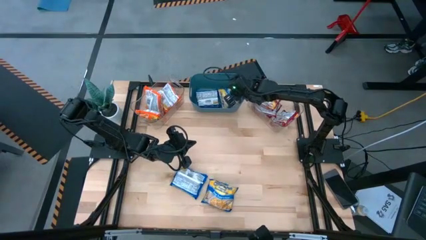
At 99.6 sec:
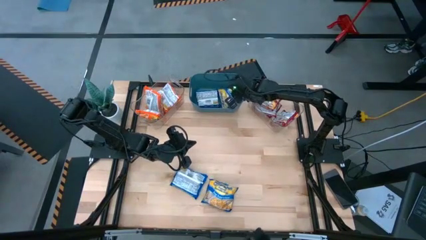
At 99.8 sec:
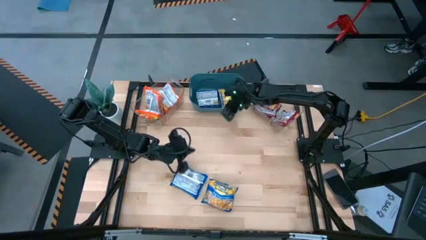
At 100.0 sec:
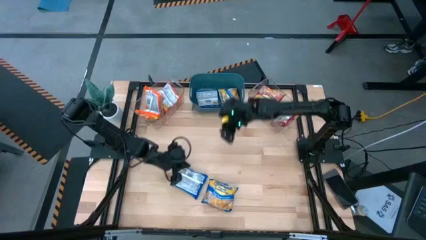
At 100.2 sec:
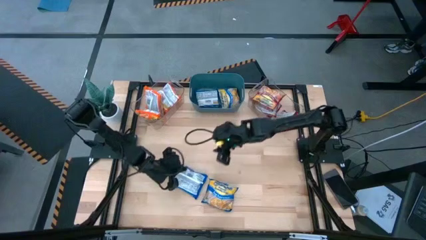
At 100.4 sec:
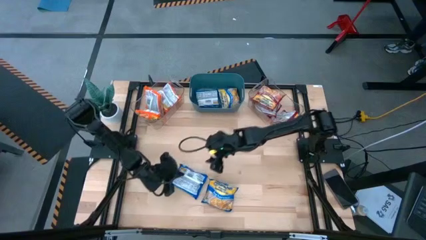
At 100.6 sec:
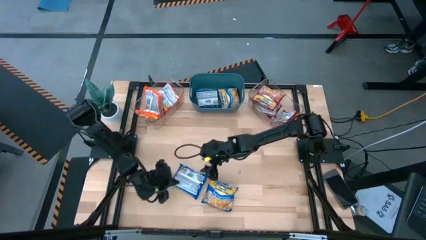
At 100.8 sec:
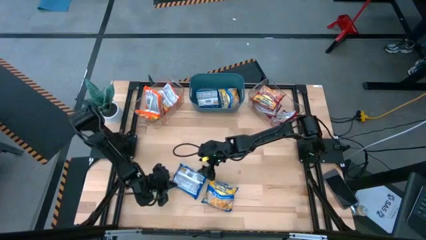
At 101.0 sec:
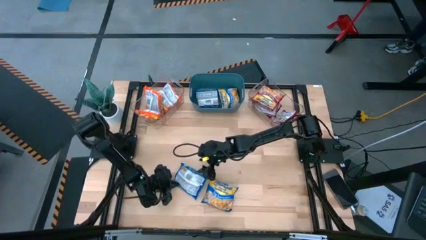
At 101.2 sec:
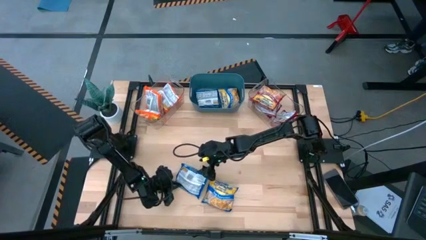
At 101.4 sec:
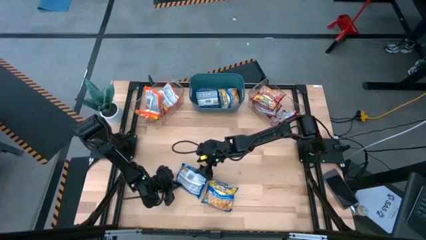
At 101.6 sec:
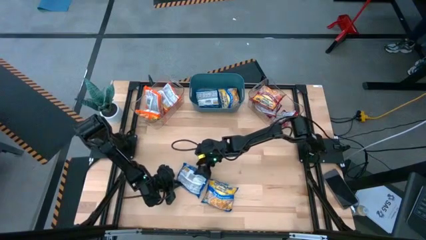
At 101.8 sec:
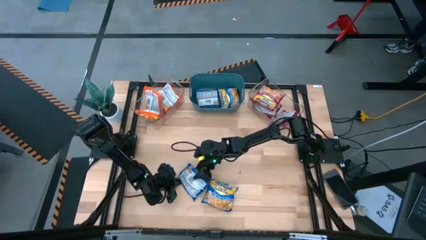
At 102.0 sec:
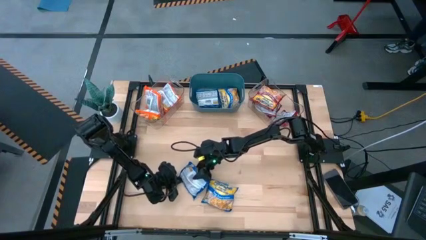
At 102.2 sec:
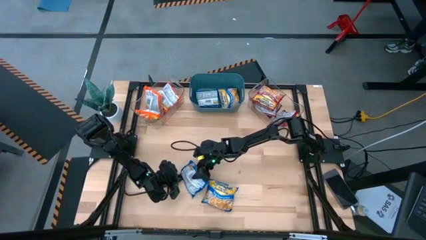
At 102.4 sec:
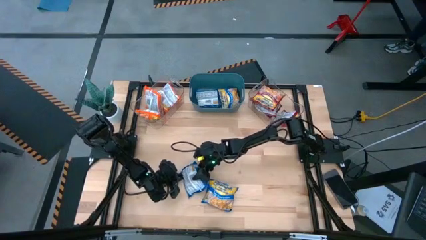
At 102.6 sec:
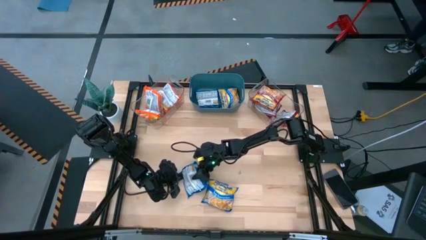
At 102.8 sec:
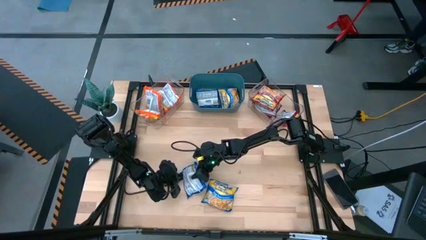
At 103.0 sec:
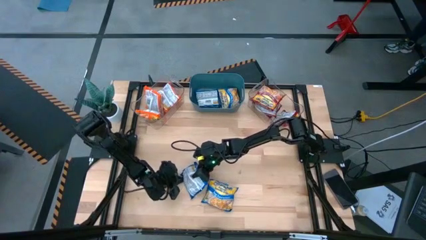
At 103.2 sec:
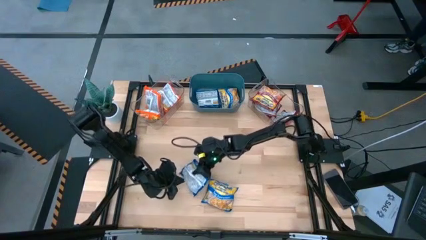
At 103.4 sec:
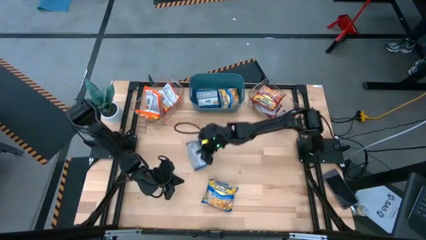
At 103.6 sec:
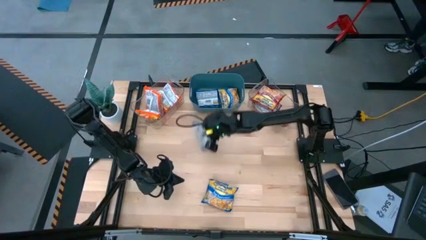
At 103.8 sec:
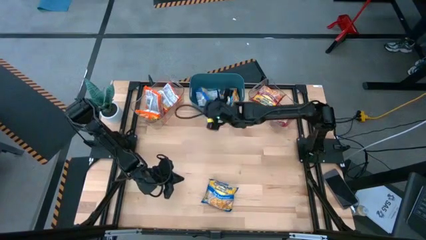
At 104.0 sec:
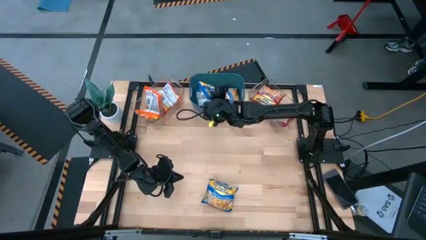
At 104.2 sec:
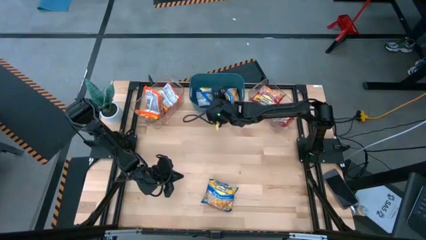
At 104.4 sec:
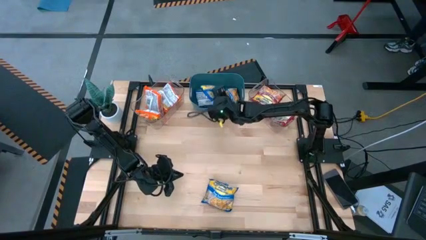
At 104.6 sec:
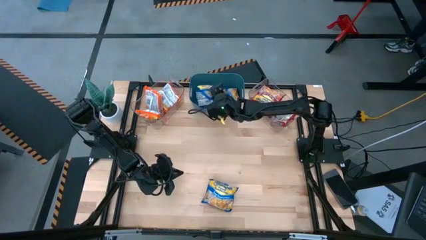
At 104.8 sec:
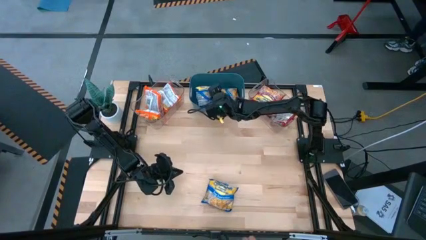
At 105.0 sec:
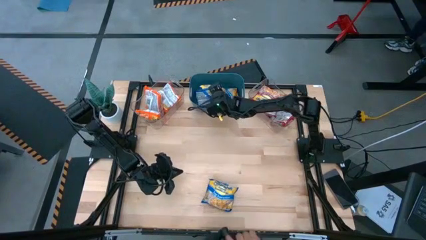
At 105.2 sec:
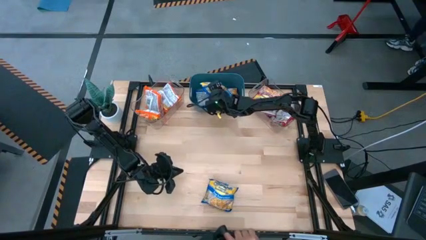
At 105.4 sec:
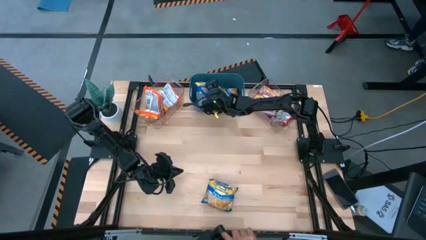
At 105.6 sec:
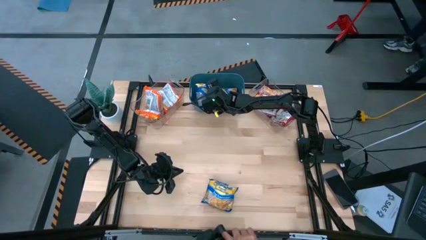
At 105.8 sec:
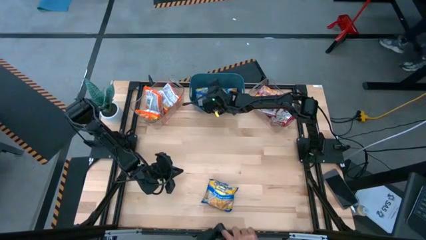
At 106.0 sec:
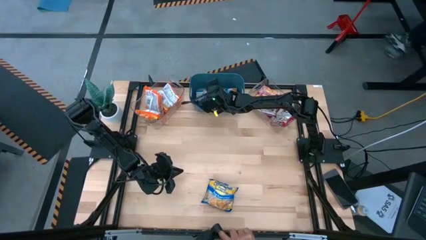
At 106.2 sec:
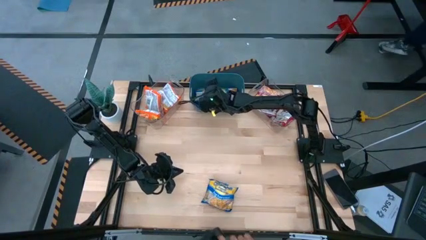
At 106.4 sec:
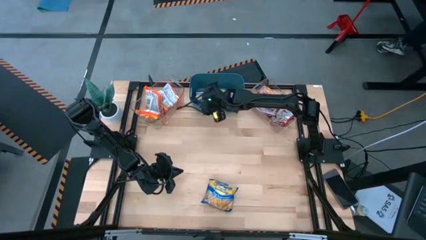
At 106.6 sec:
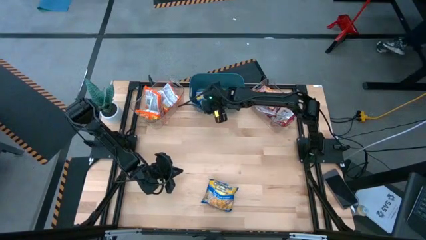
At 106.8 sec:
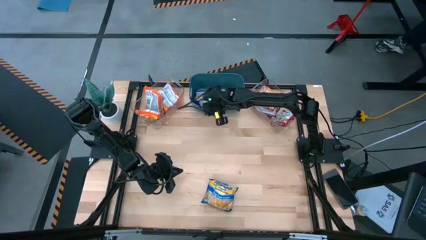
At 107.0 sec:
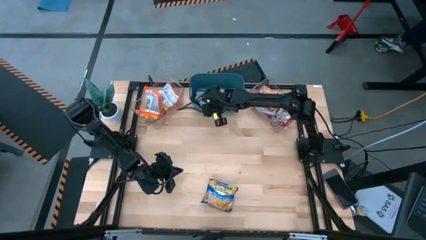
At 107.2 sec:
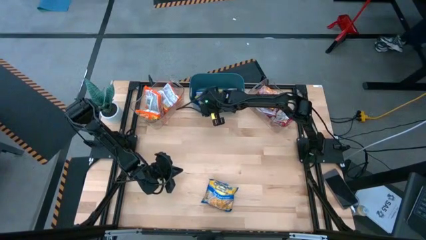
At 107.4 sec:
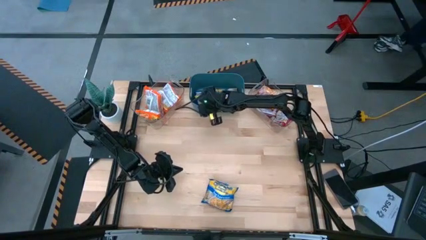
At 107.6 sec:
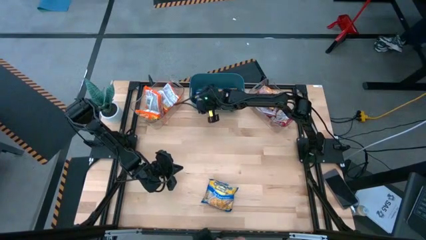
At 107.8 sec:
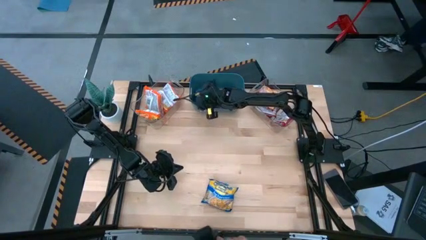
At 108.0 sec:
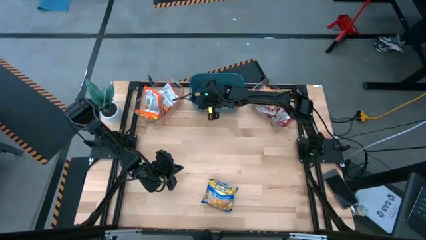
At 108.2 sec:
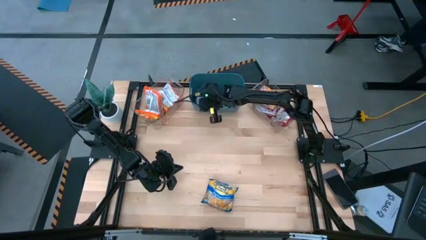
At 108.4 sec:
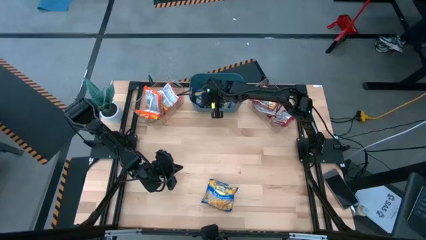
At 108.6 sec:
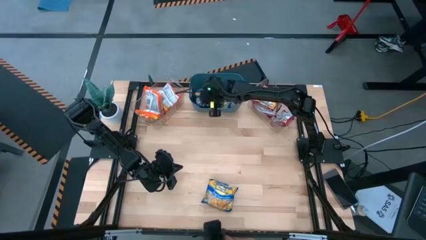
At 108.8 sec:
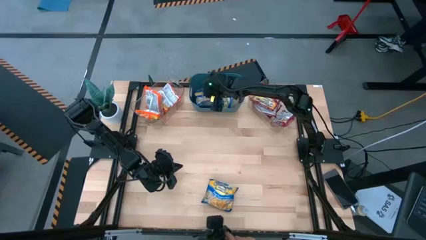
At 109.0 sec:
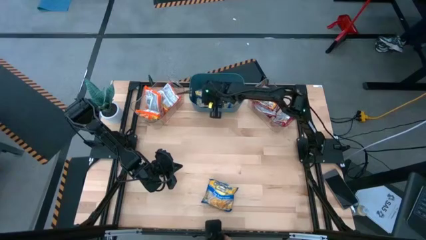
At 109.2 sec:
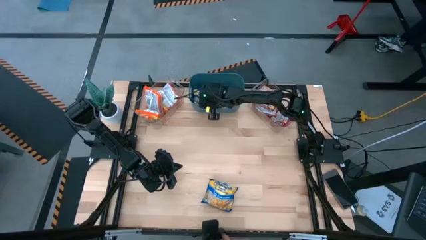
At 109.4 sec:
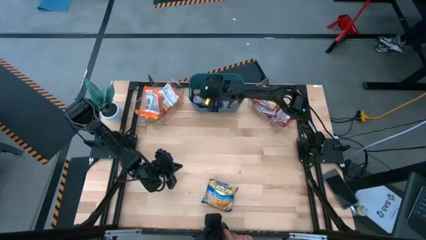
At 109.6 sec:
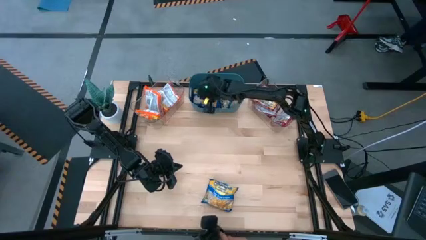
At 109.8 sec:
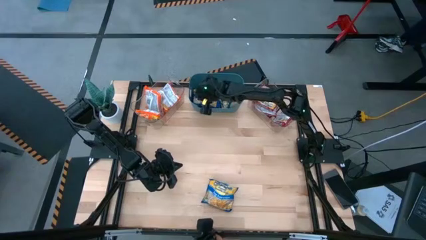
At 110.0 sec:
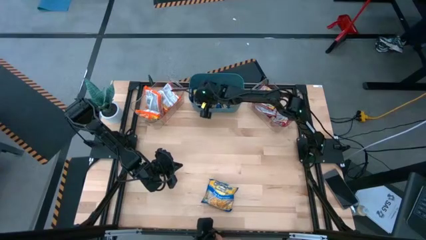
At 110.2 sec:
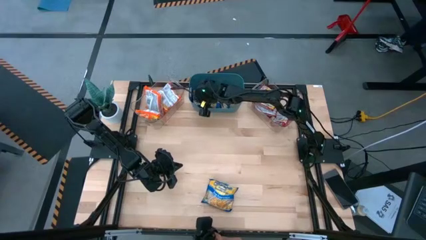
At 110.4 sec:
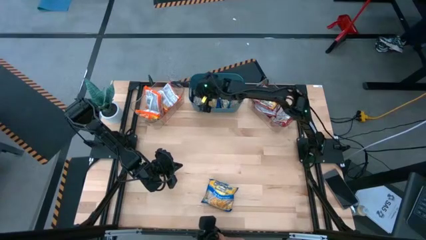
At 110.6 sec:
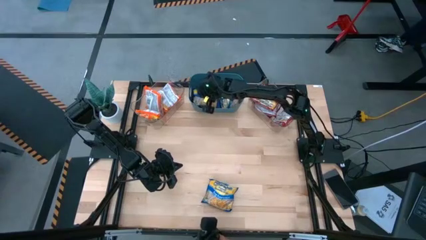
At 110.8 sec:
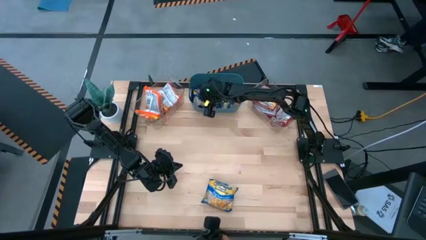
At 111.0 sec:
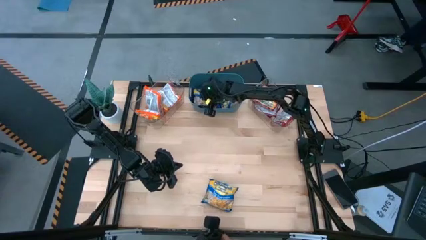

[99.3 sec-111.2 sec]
Task: Sort Maruchan noodles
Put the blue noodle pack into the blue bin
